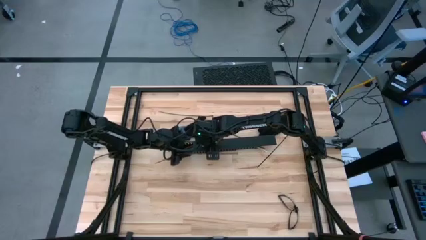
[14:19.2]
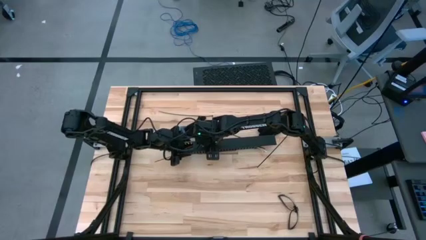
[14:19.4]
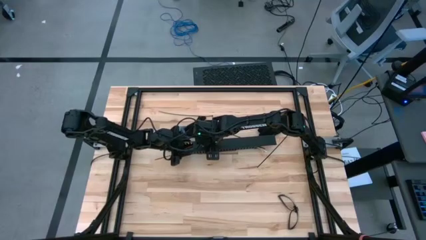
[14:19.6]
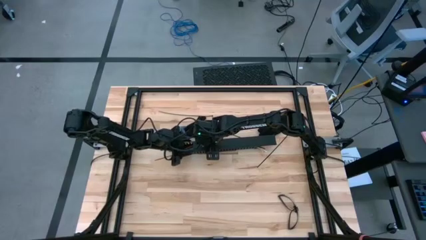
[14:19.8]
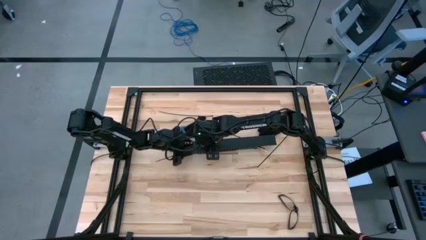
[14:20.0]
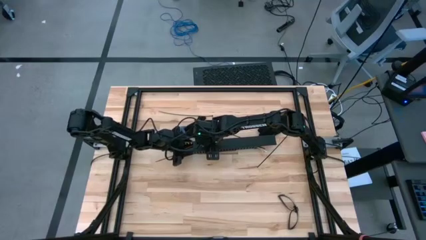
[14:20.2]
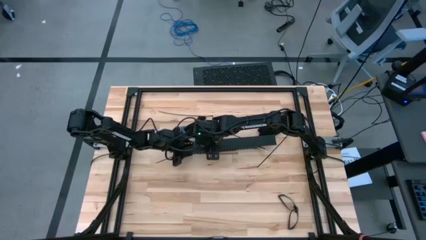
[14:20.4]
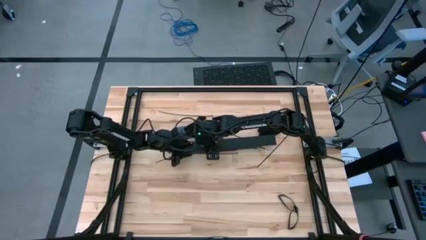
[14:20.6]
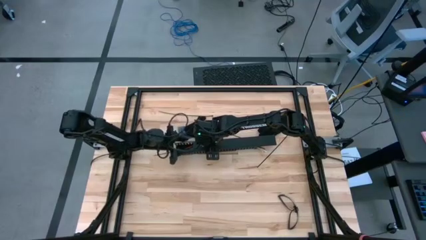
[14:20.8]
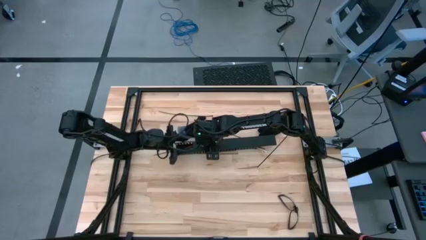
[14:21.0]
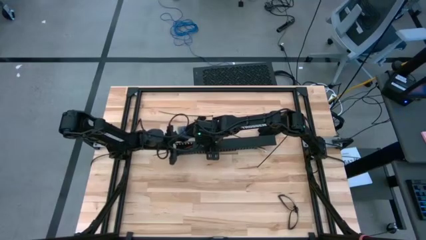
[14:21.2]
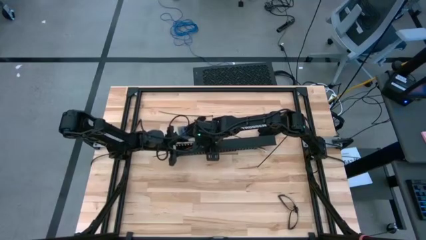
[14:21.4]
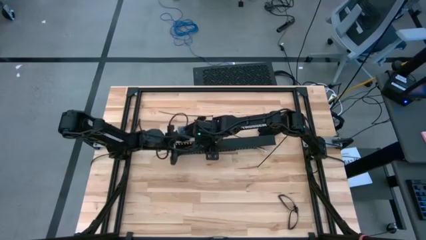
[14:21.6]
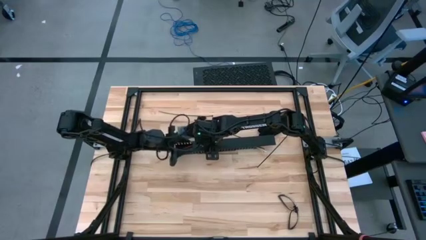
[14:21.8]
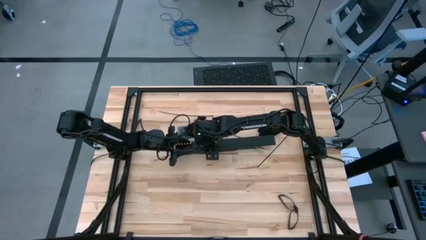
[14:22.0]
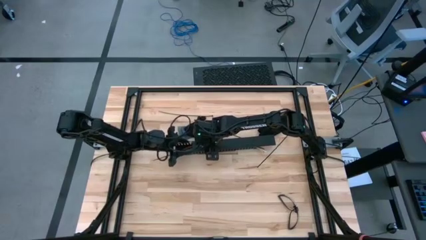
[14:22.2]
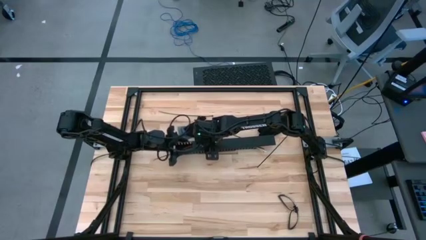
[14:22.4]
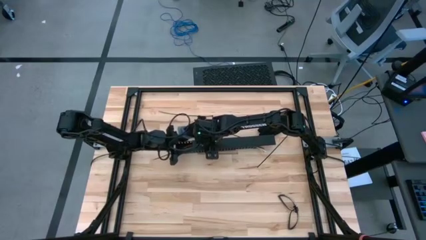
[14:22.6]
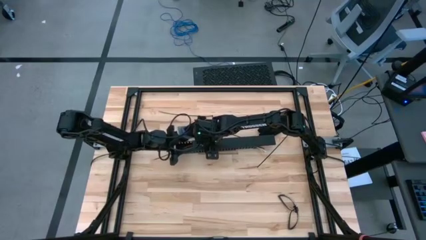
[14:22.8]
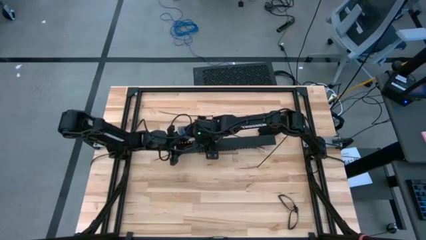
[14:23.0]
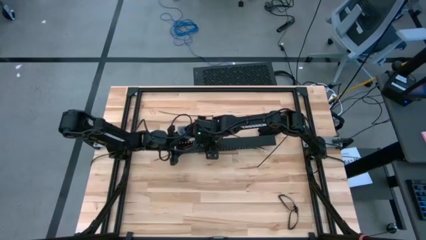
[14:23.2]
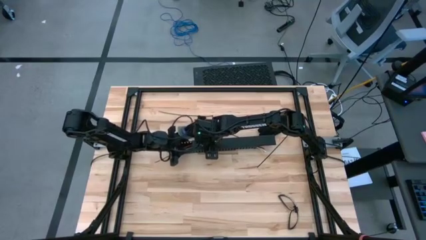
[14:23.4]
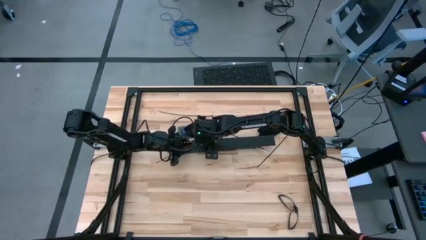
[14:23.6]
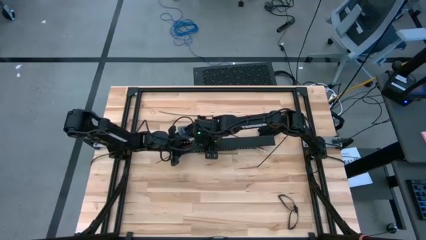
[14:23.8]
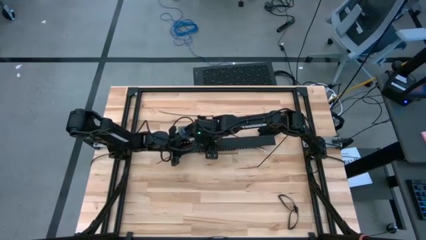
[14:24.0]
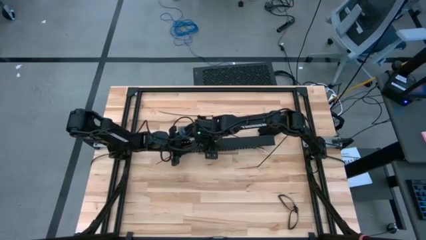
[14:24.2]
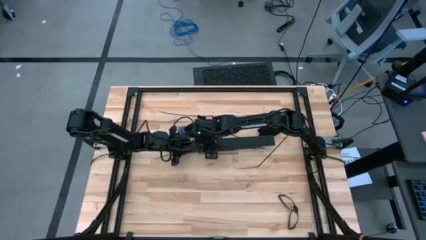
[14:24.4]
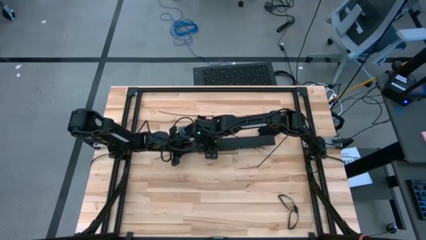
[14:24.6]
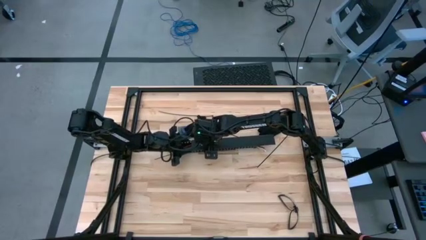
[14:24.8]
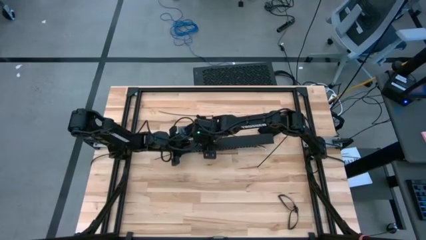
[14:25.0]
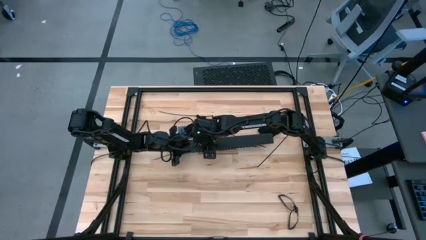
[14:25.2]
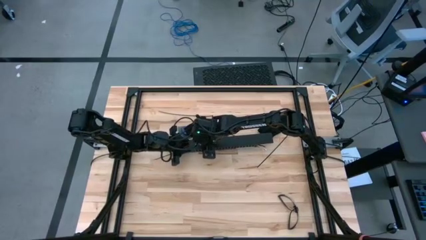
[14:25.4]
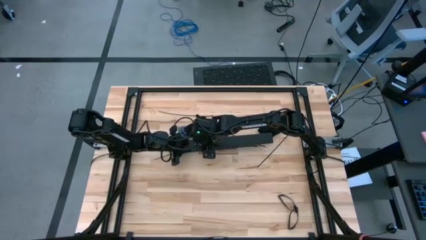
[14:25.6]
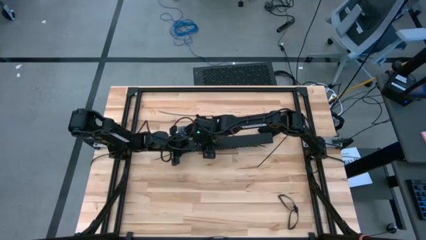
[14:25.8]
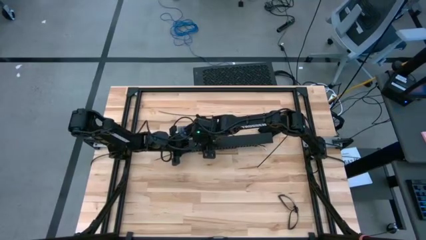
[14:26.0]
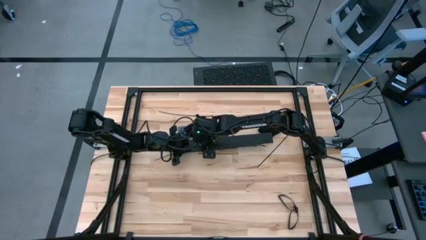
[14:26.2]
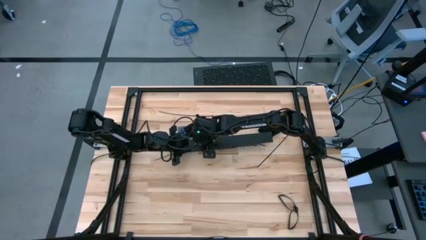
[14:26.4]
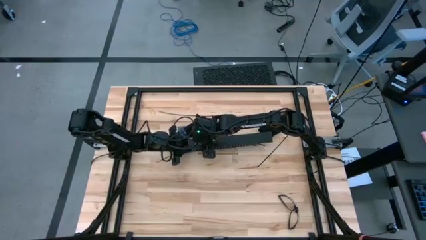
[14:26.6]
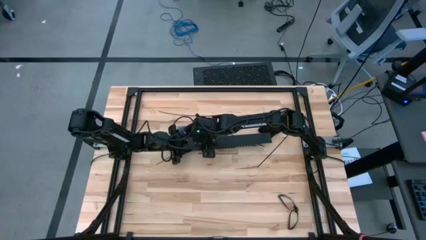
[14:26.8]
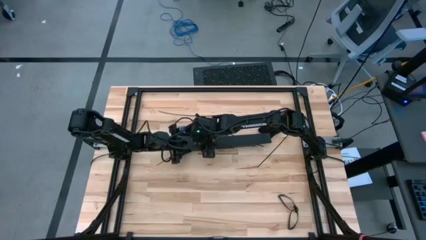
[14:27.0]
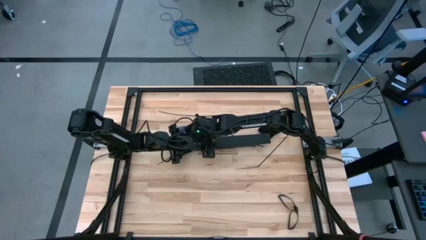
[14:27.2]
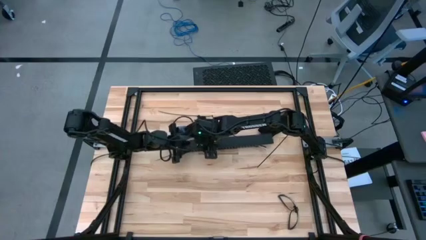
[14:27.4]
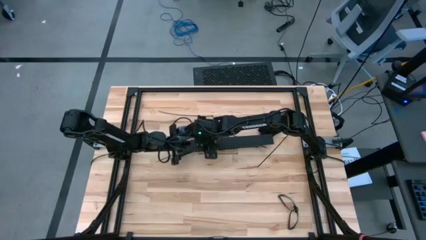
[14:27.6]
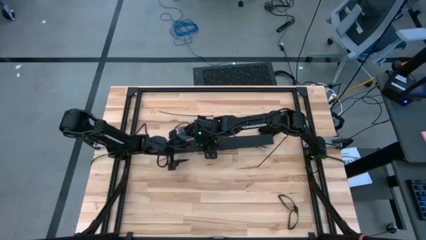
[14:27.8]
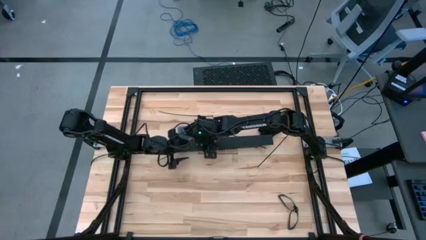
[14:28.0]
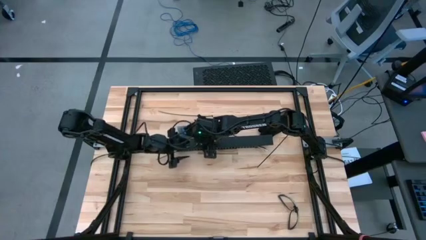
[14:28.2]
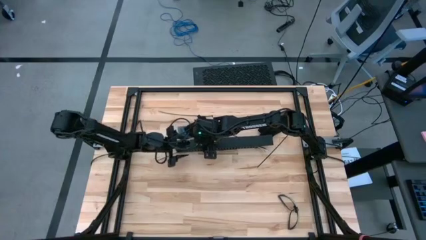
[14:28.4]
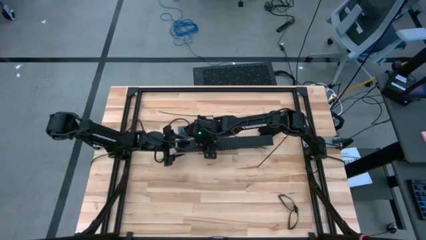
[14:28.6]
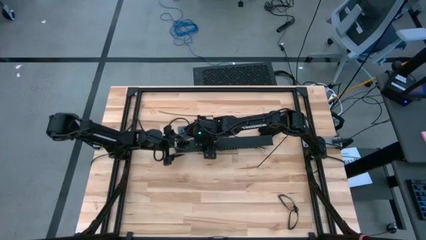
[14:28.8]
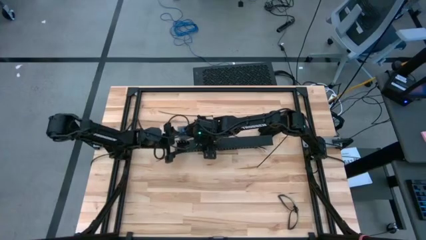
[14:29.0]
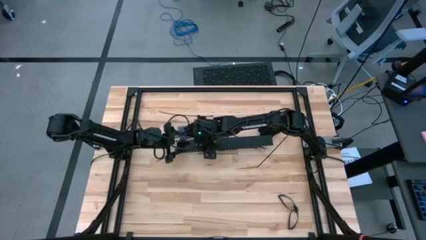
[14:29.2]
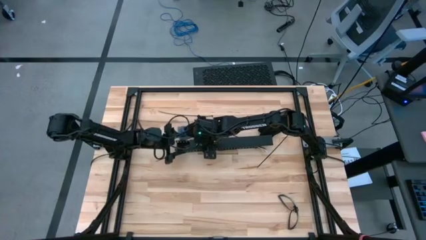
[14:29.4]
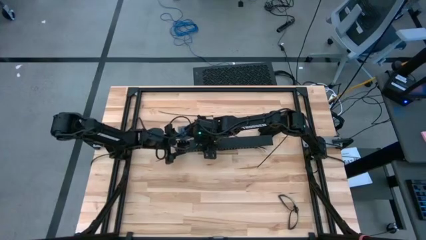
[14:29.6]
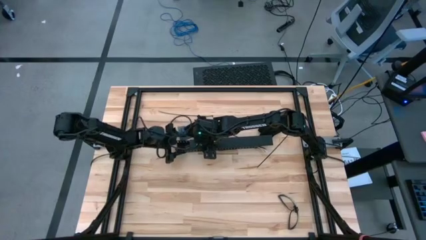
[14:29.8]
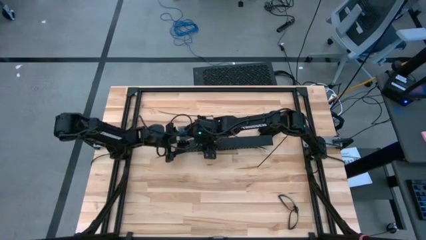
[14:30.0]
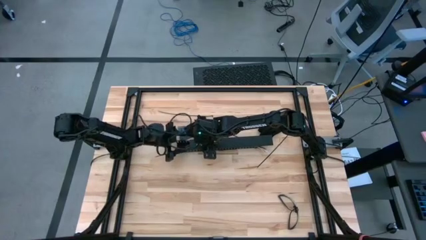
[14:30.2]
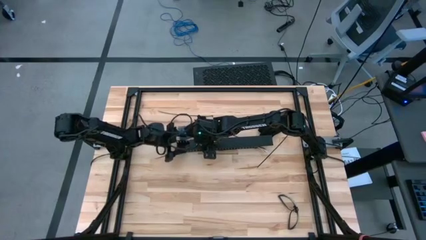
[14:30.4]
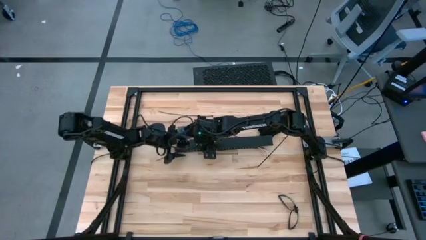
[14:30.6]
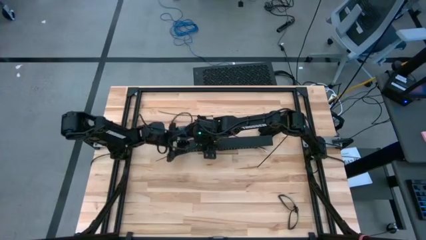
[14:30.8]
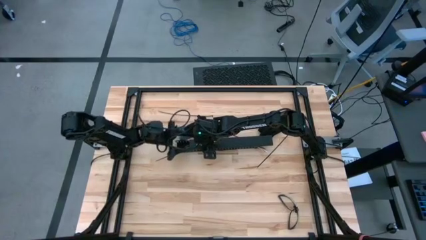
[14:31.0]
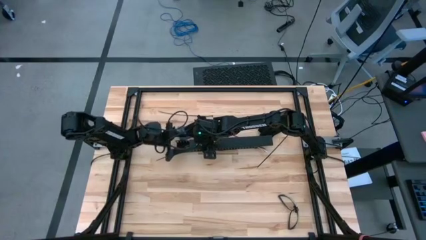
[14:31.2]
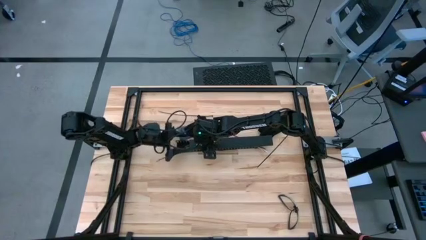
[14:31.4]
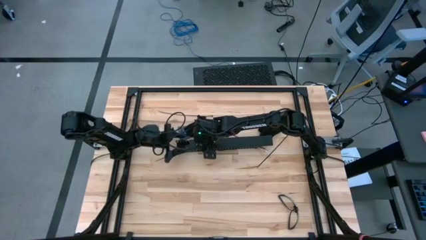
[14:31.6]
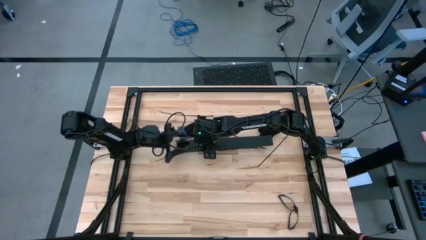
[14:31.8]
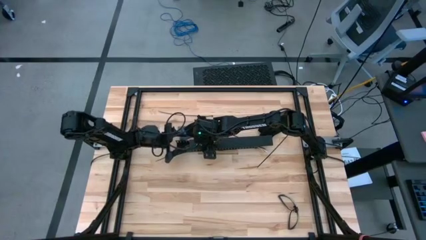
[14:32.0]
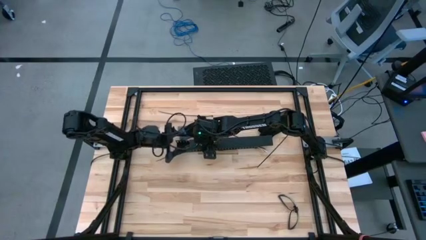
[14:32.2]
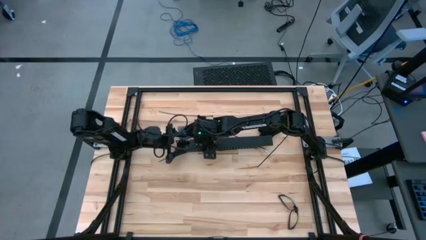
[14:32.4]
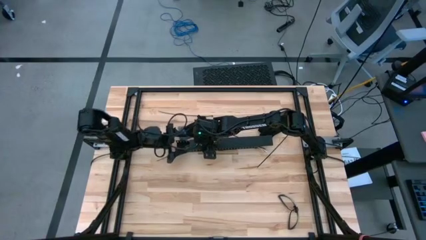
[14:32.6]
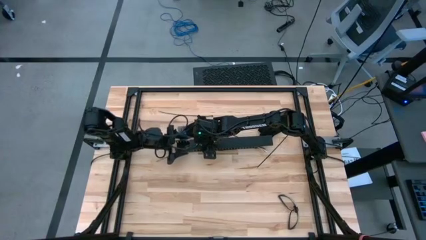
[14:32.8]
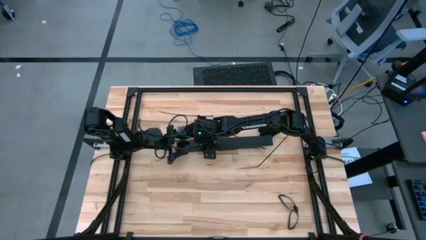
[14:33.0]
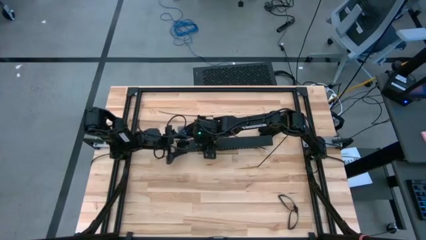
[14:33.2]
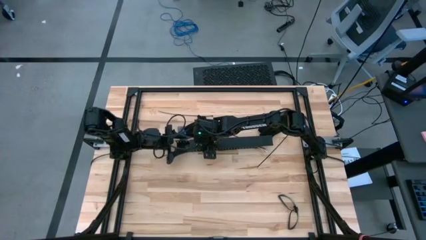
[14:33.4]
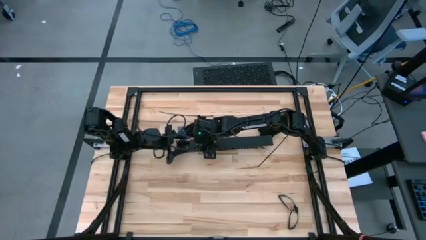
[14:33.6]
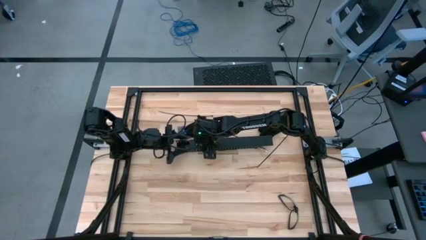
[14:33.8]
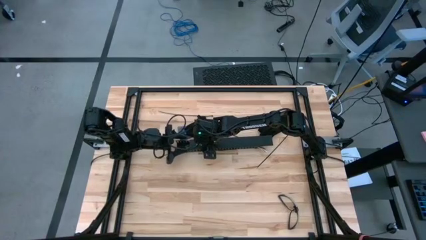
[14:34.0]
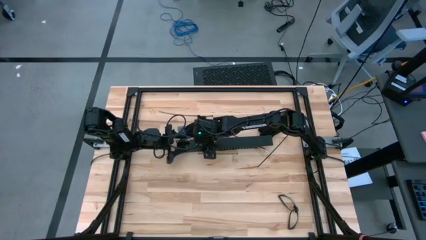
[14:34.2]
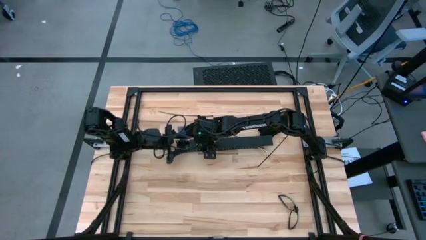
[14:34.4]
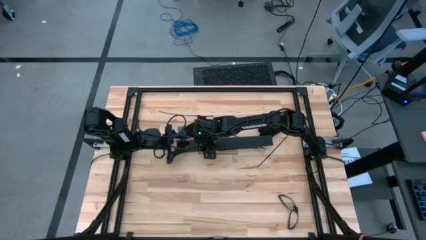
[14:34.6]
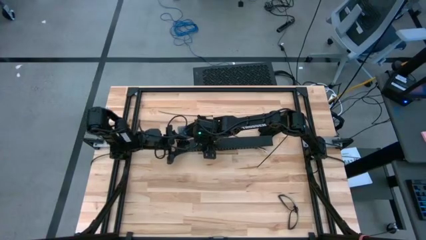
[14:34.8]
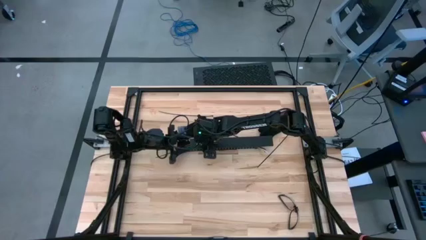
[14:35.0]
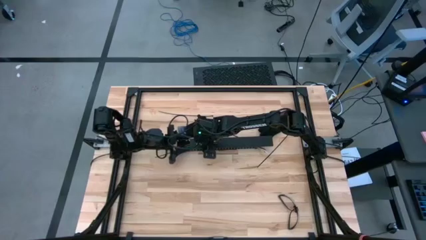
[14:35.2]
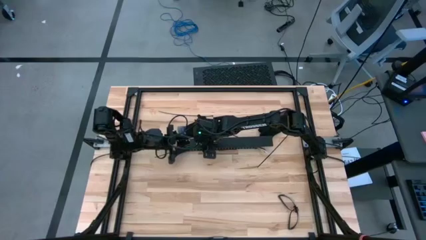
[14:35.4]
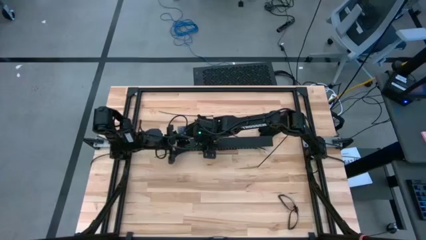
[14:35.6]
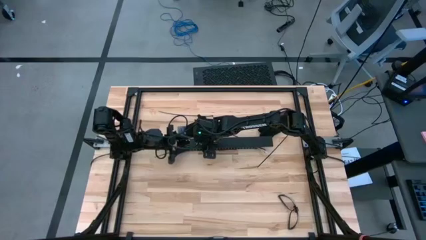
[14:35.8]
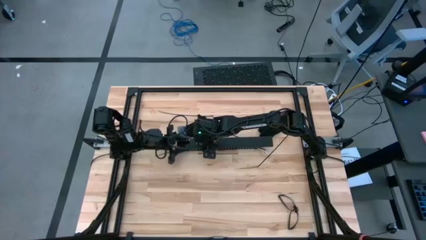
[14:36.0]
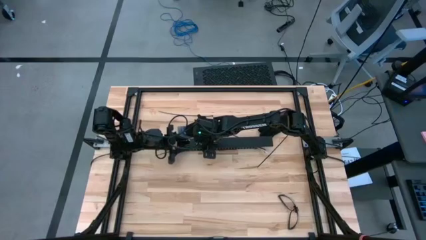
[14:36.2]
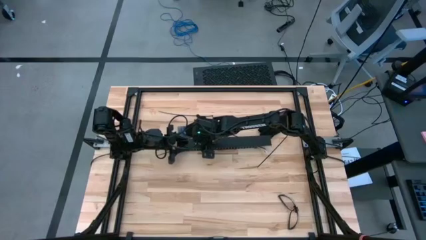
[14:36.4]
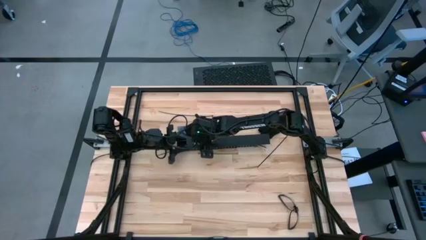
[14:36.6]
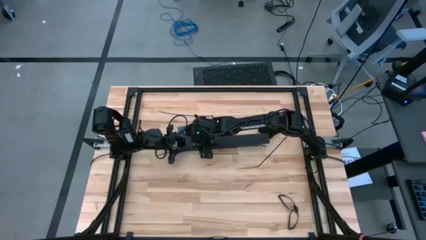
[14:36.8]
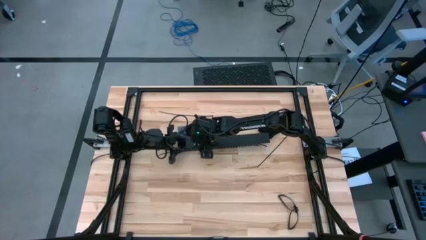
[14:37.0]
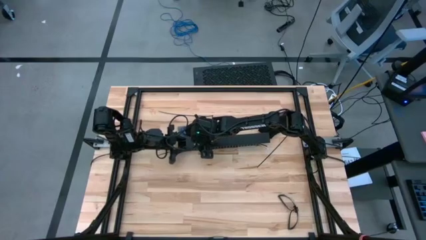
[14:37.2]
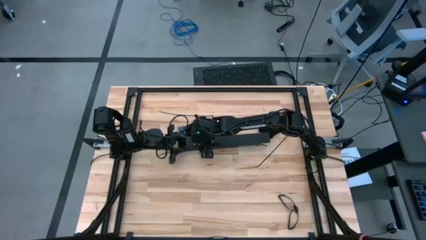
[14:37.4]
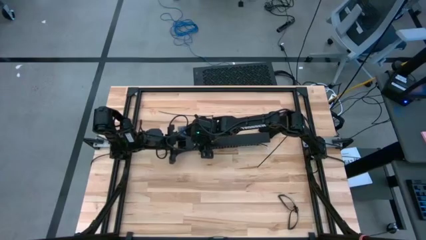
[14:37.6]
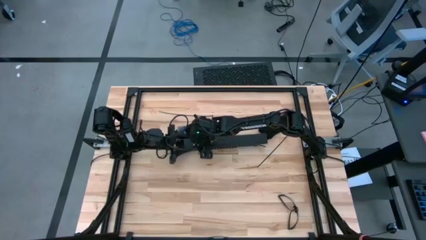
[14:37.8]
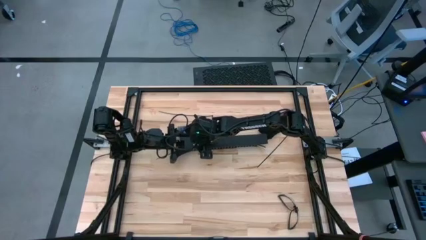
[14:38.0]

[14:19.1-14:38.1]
Task: Ziptie cables
Close the cable duct
